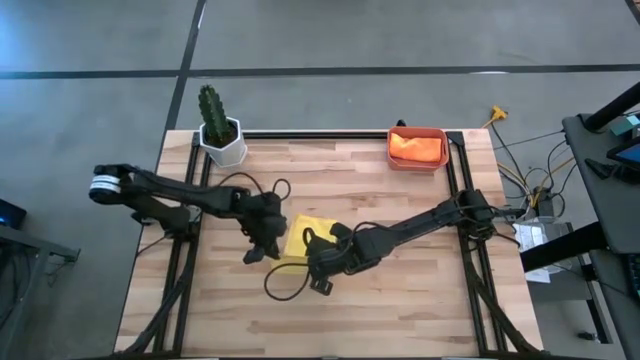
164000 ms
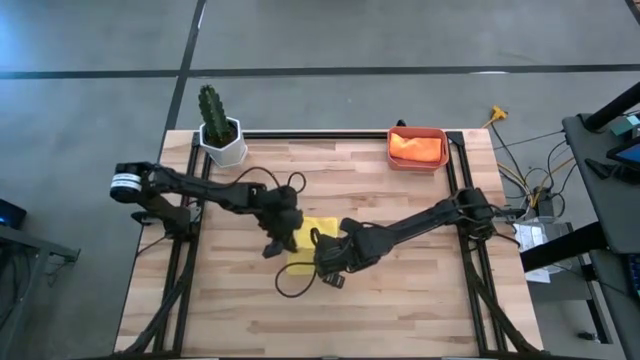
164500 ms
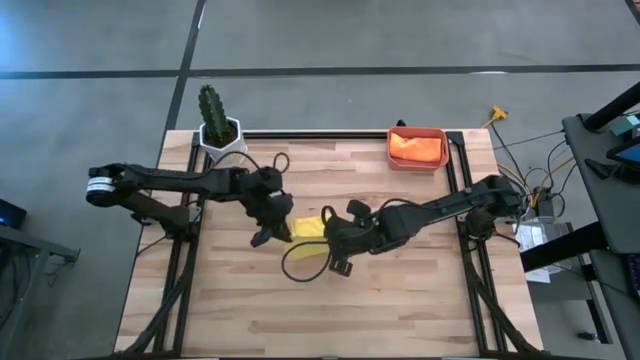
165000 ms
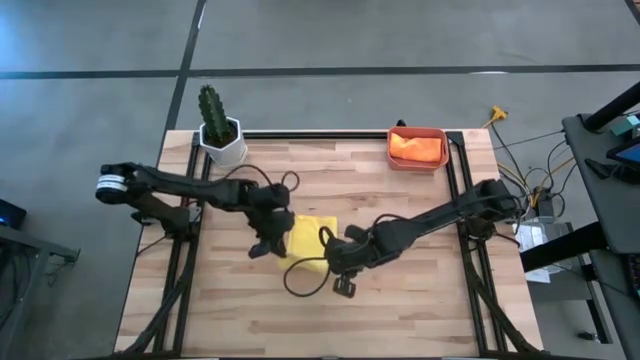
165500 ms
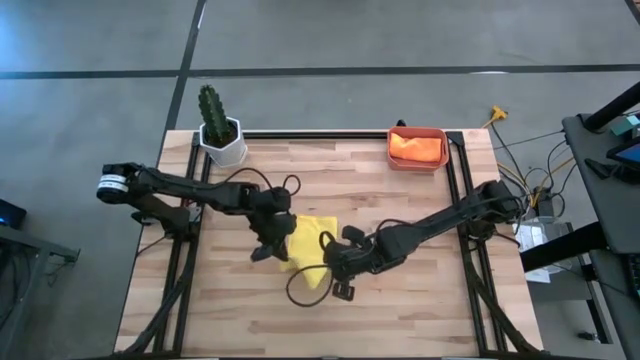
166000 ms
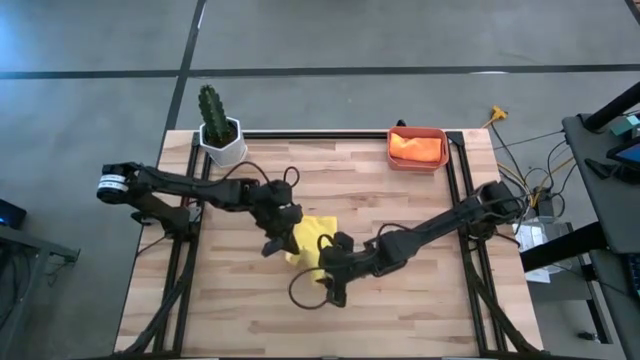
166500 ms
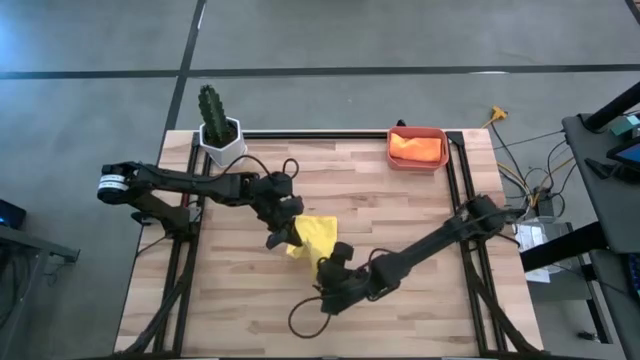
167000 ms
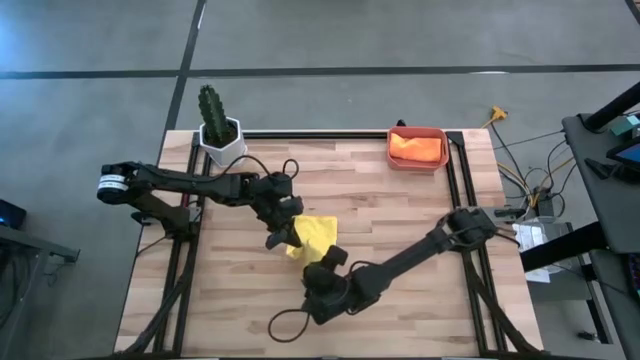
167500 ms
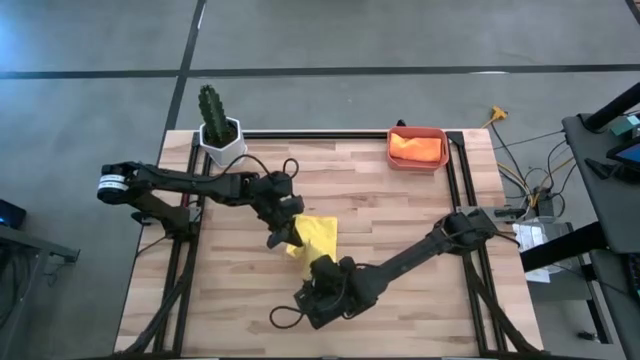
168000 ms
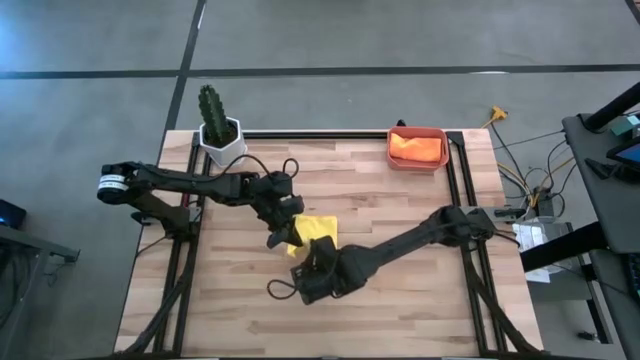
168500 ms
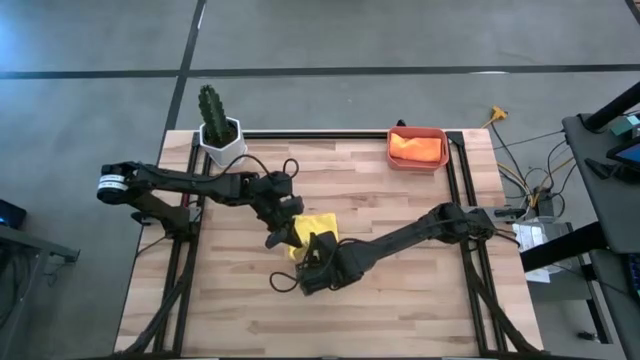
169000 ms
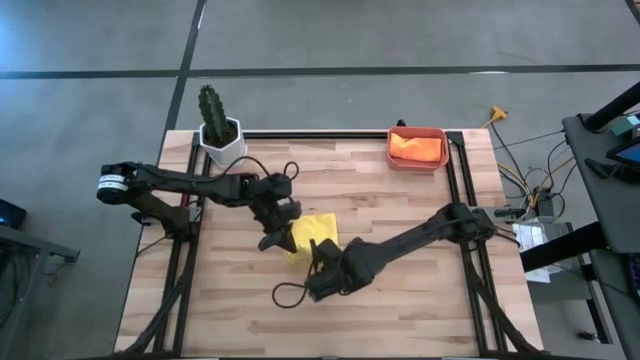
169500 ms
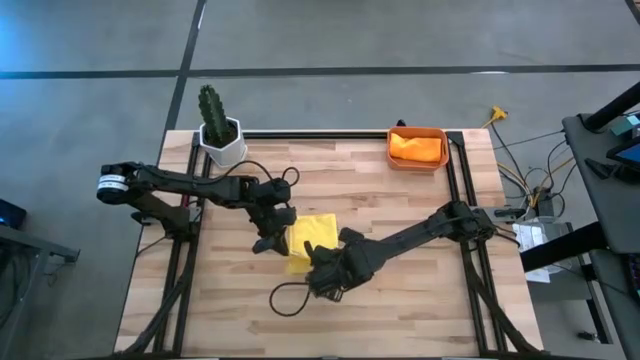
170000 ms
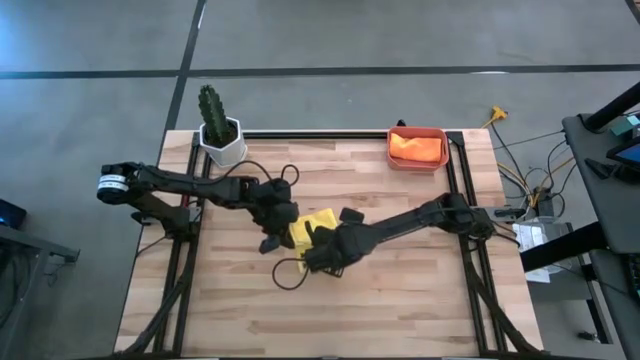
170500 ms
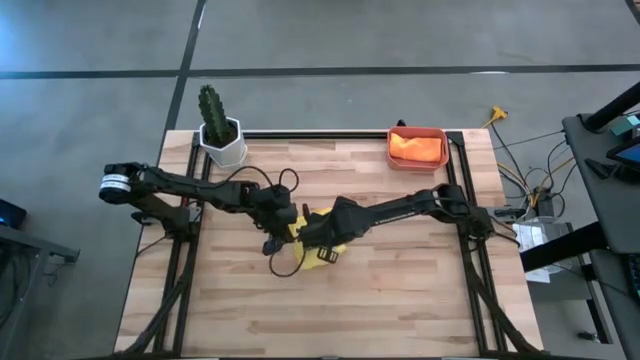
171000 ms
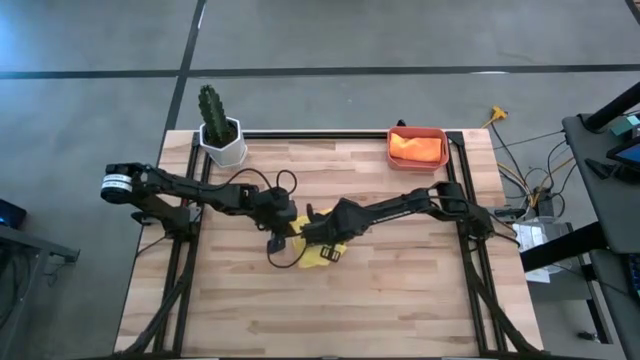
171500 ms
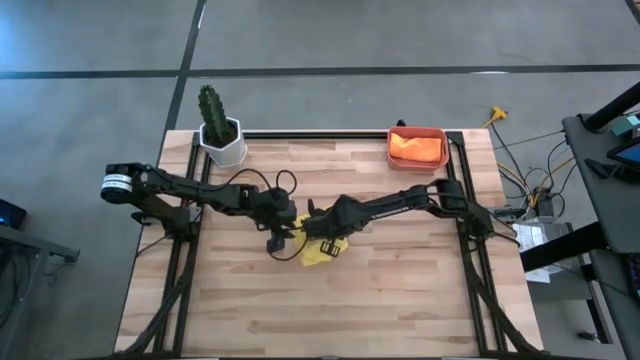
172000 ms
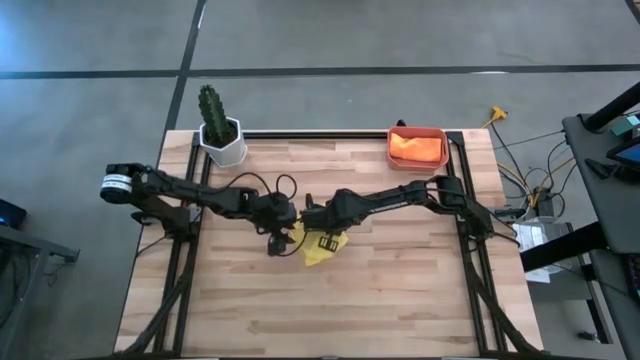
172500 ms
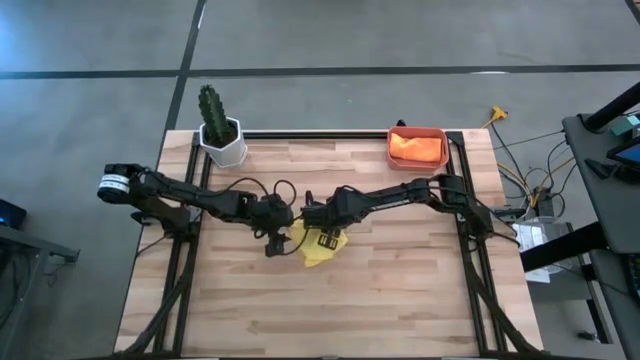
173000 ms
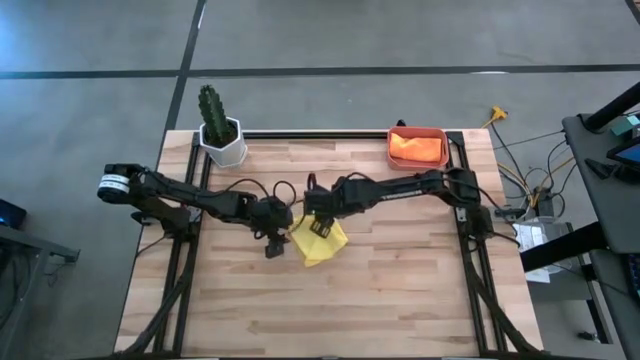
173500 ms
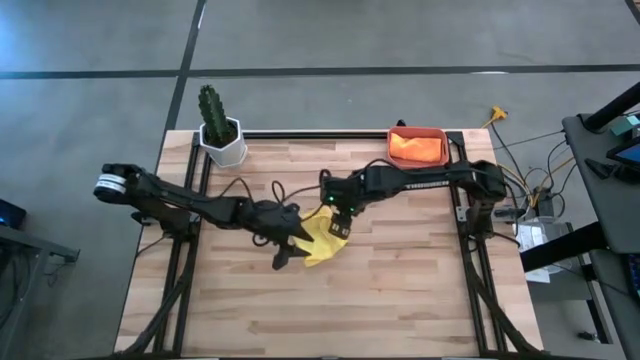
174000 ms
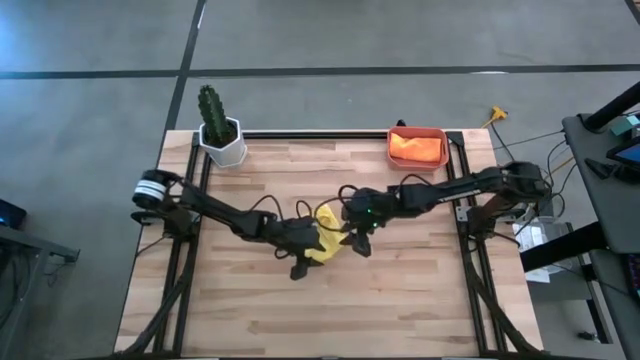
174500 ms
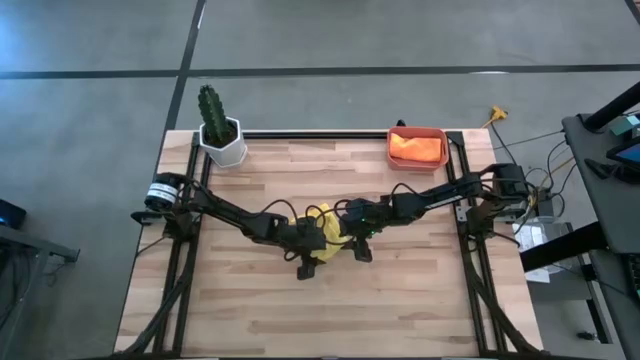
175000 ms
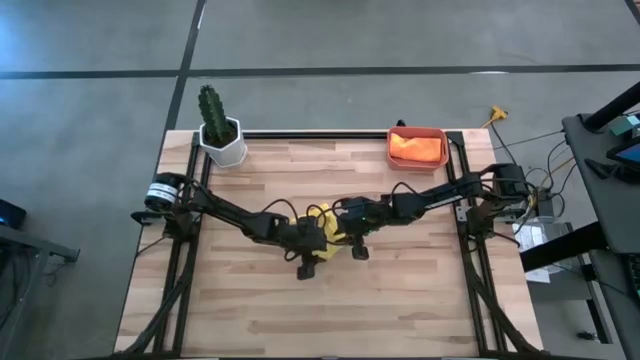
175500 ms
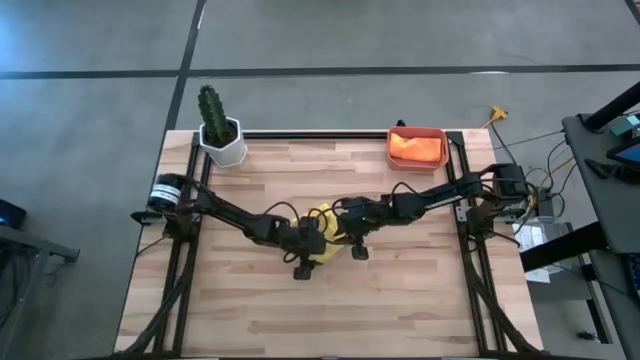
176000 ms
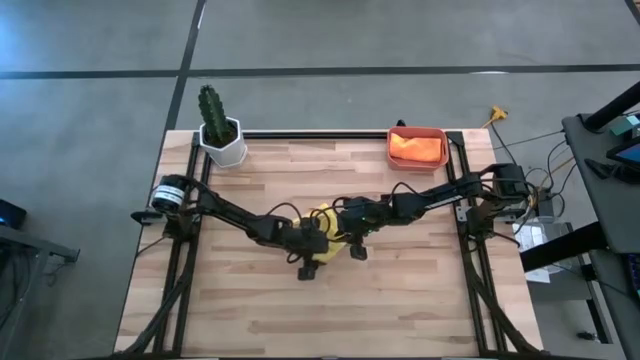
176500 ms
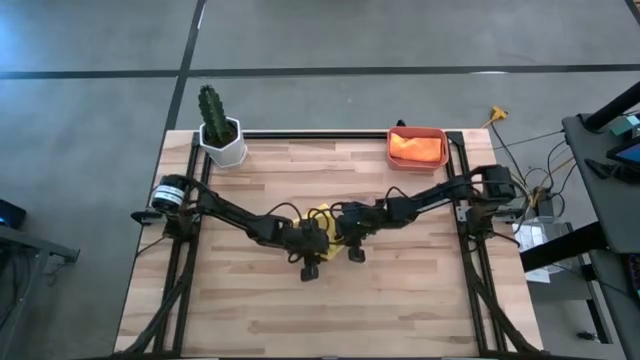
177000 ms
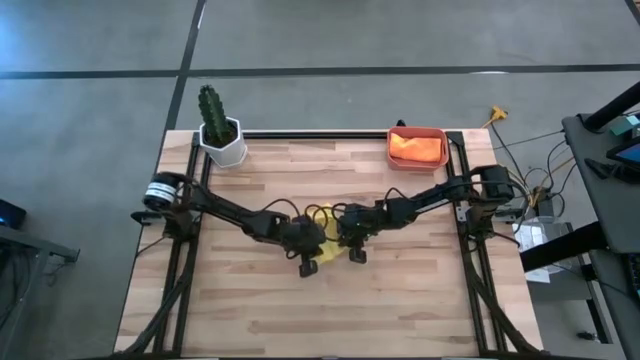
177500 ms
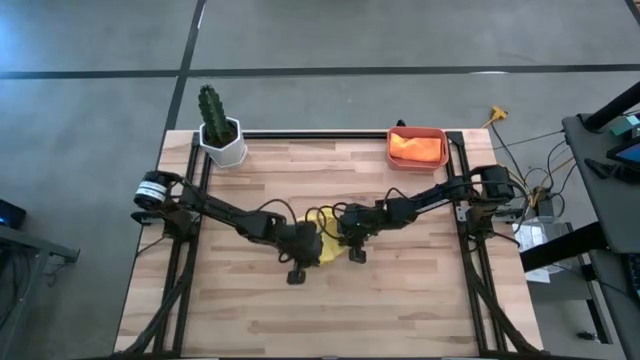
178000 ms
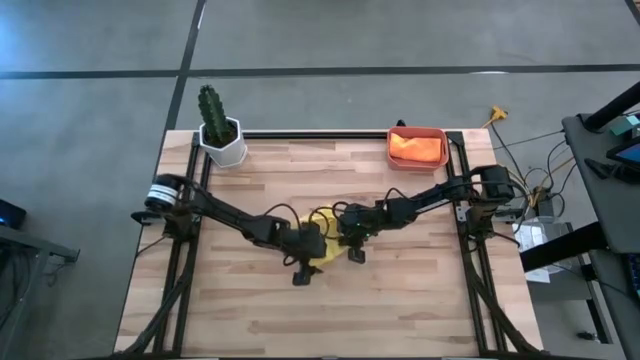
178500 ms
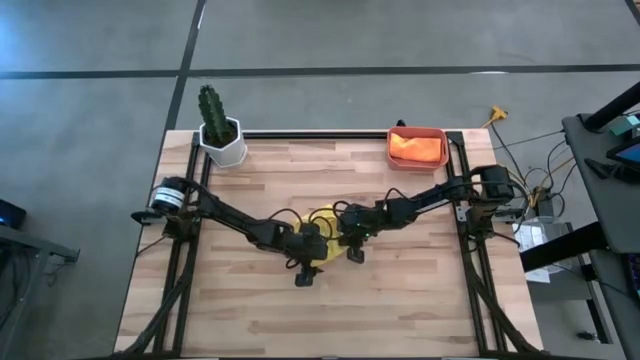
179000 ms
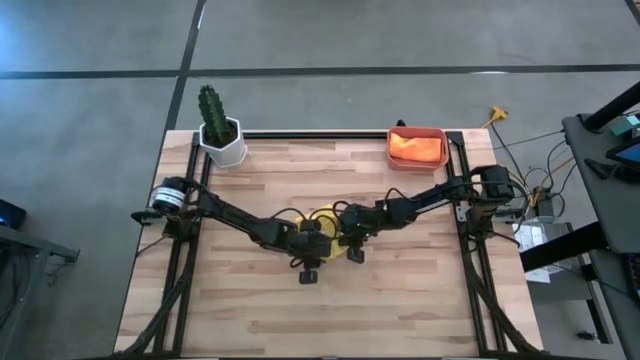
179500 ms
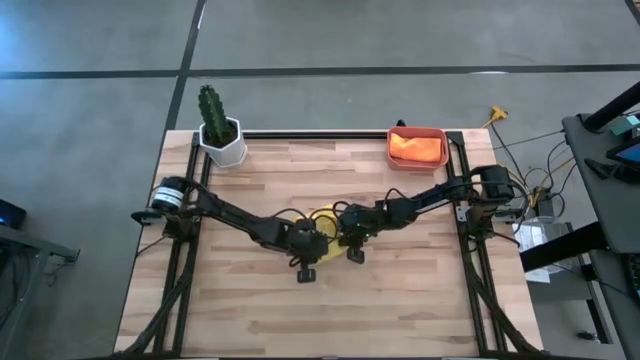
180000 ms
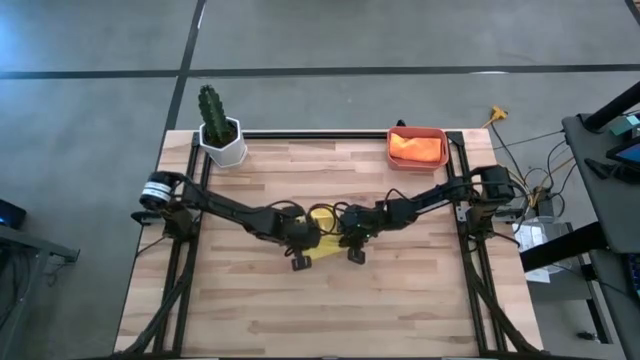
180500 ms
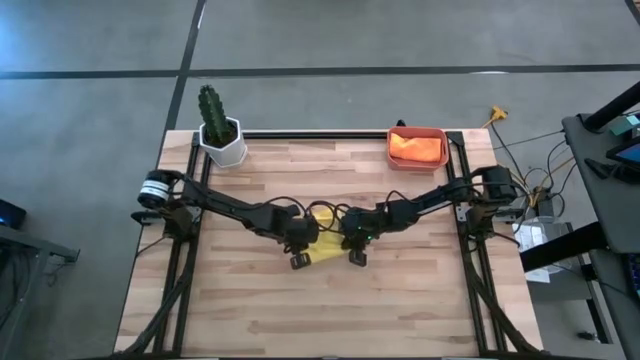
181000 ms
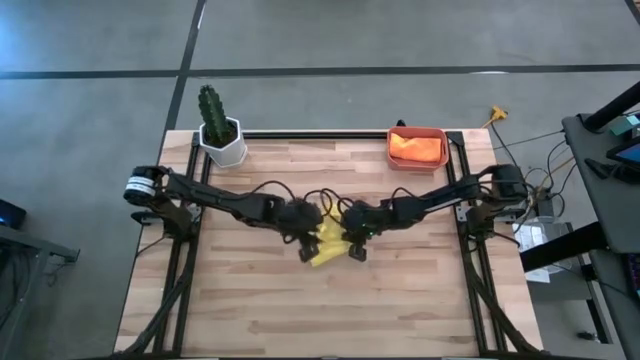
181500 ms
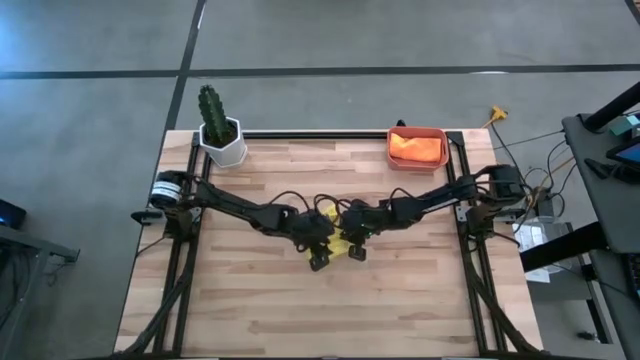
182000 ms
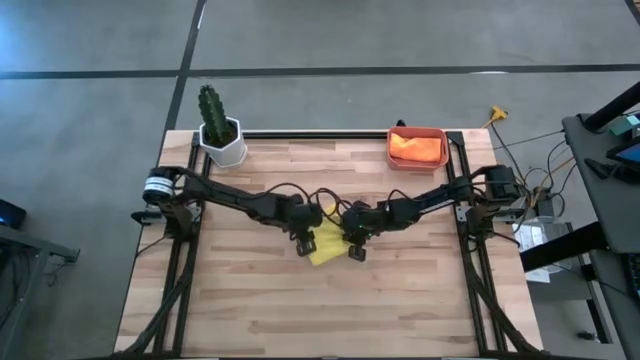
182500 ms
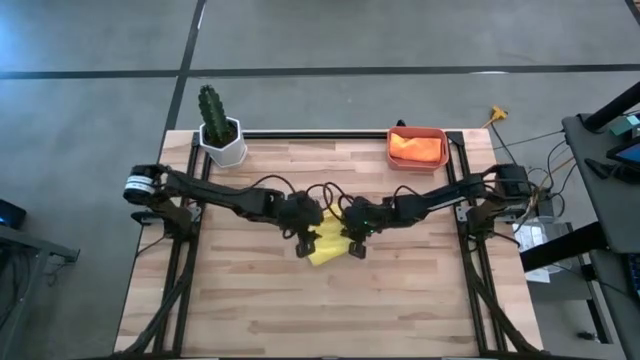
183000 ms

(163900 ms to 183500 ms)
Task: Roll microfiber towels into tight, uniform cylinder then place into a basket
Fold the yellow towel
